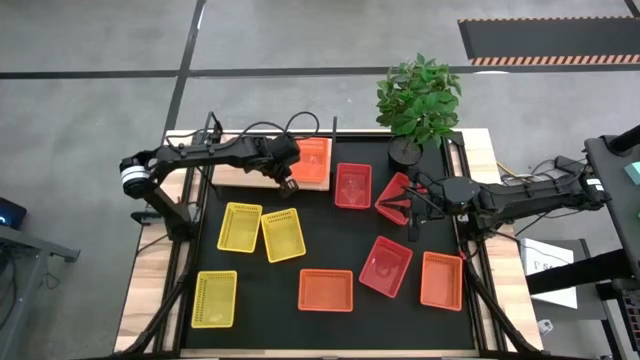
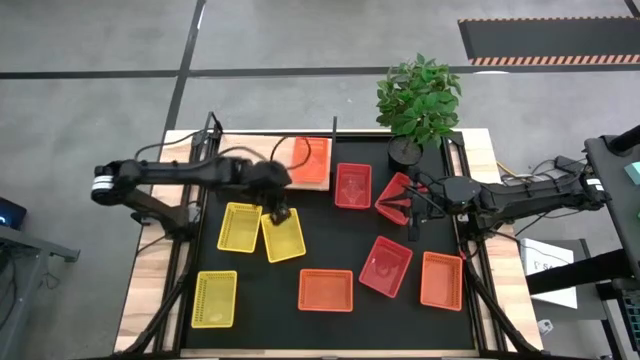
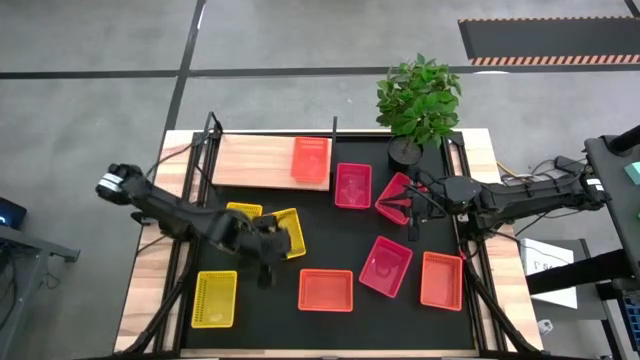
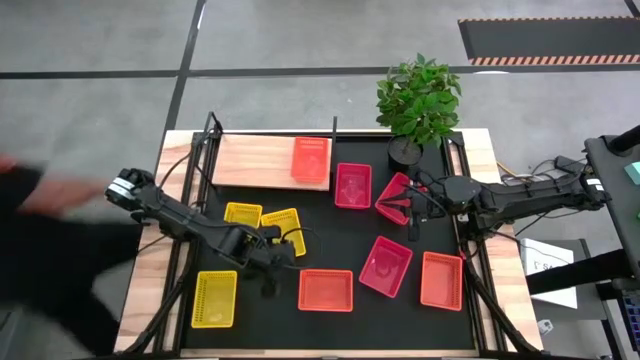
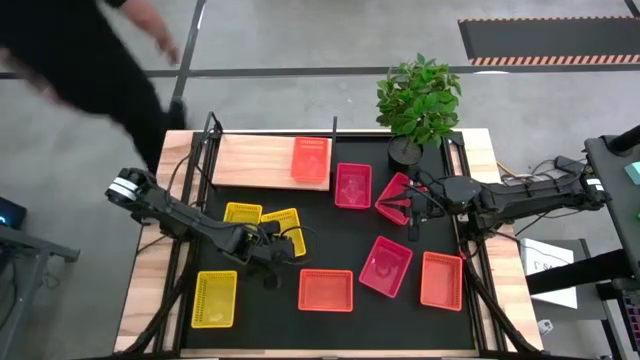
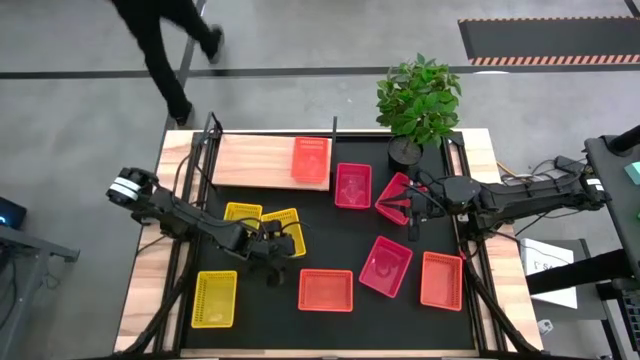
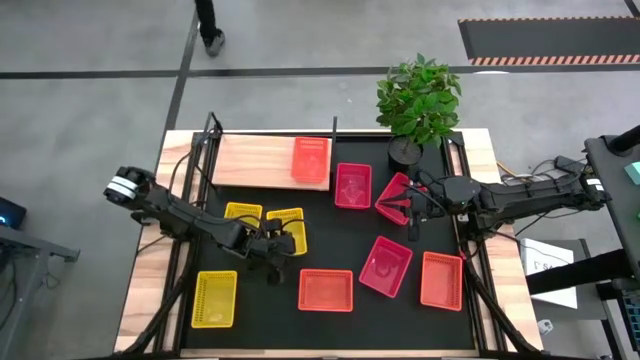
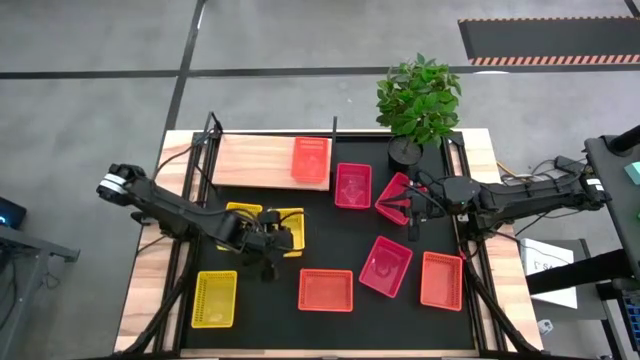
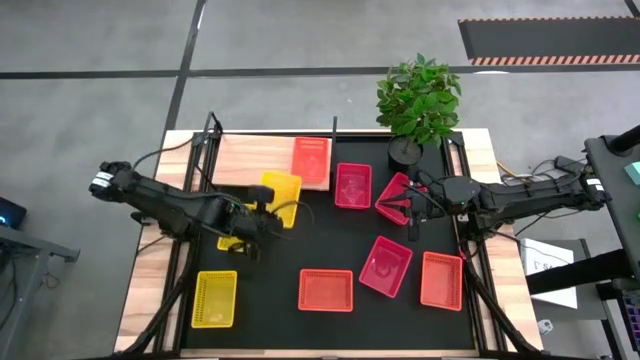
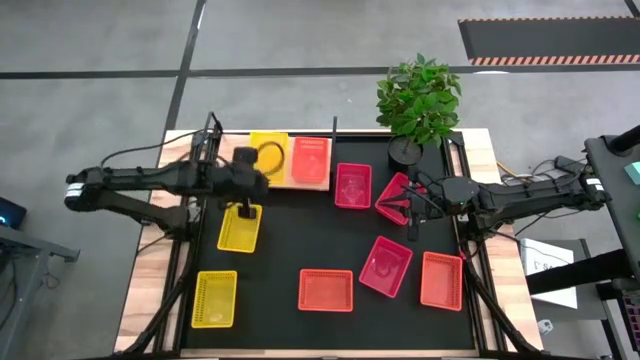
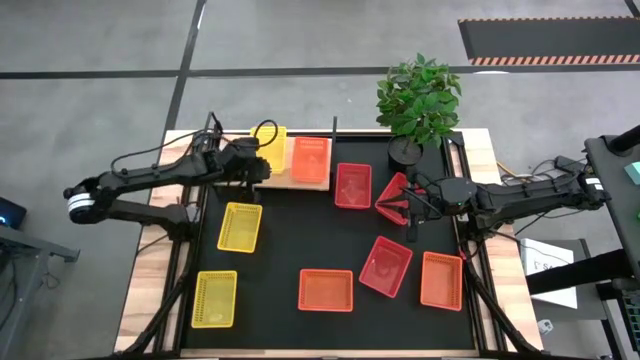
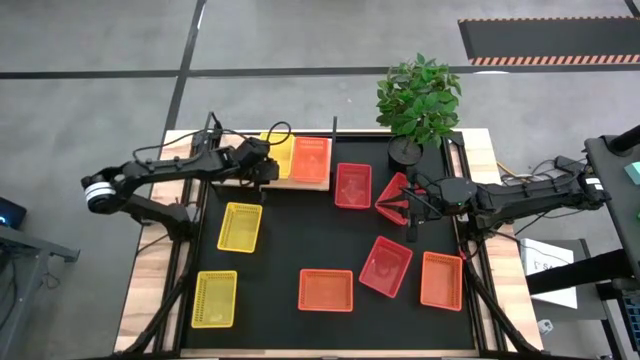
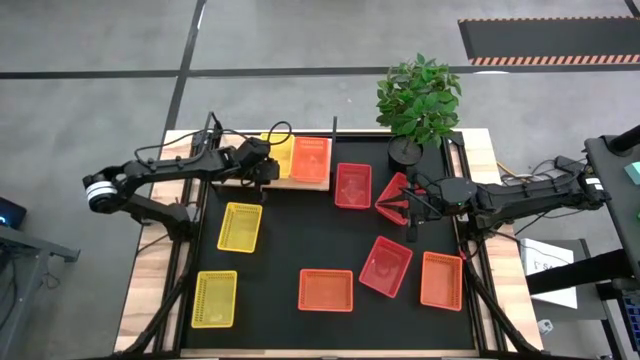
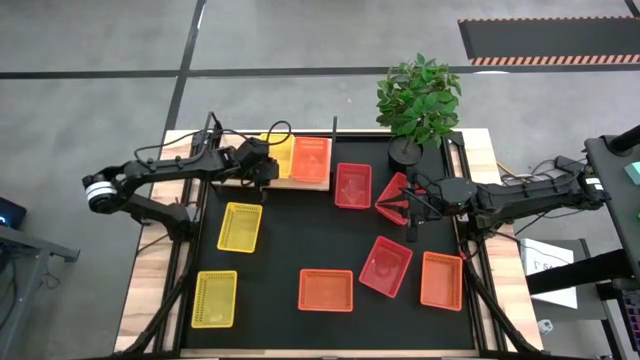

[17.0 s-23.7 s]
Task: Stack baskets on shelf by color
Put the top right yellow bin on the shelf

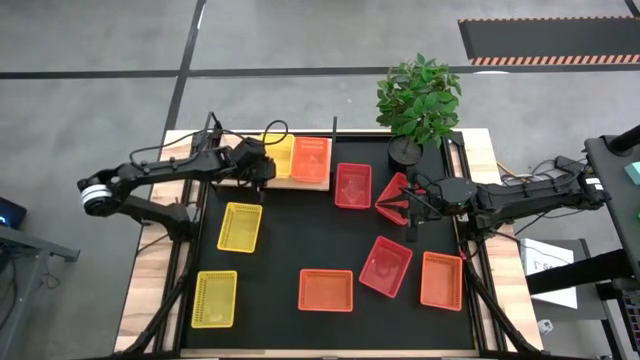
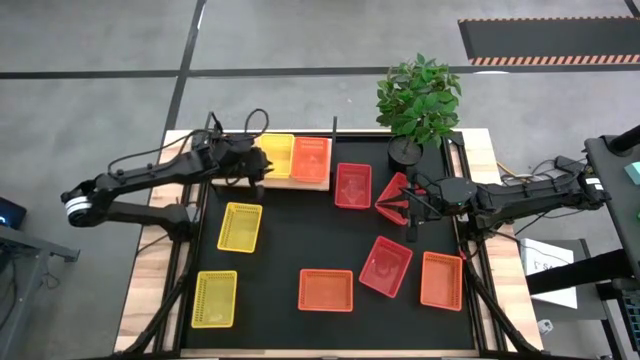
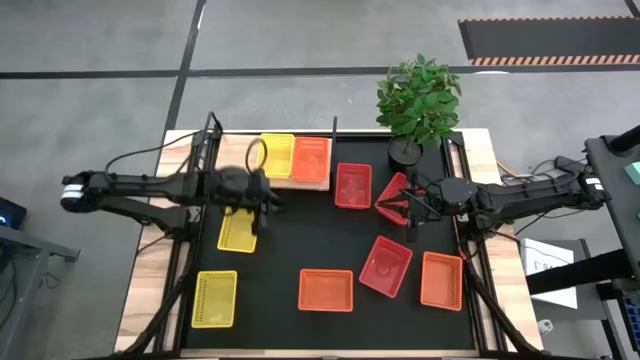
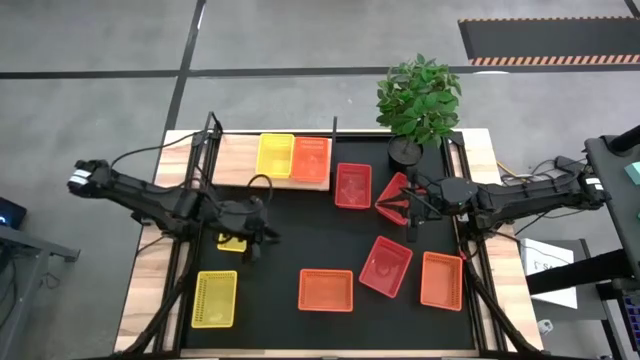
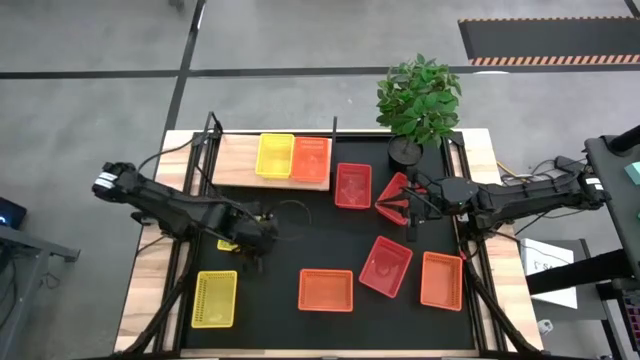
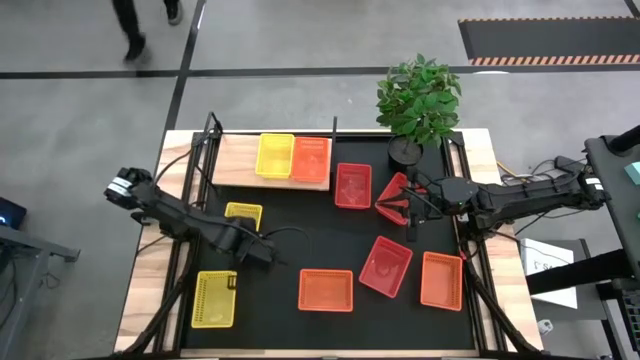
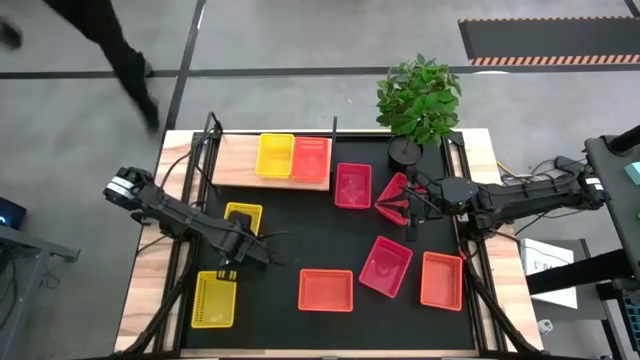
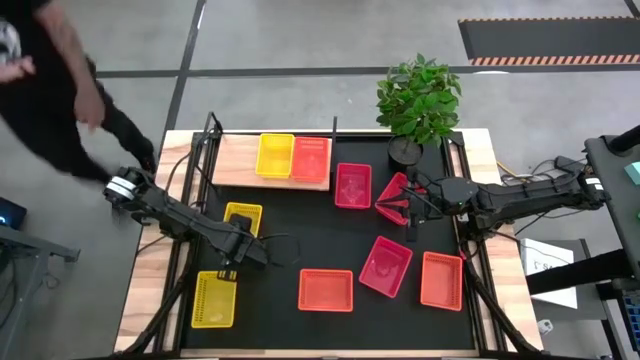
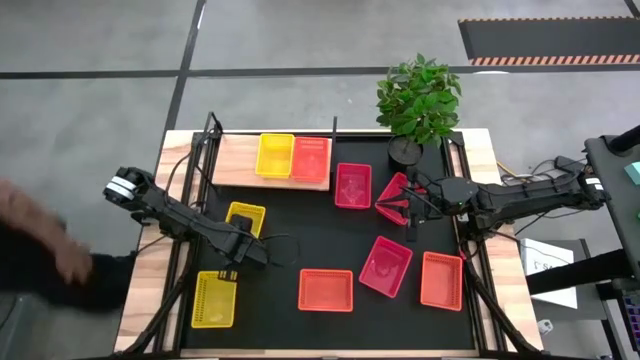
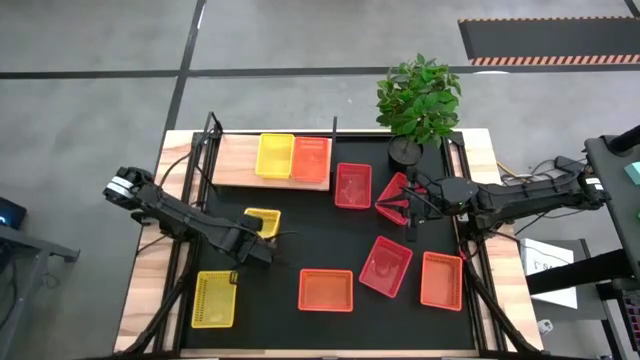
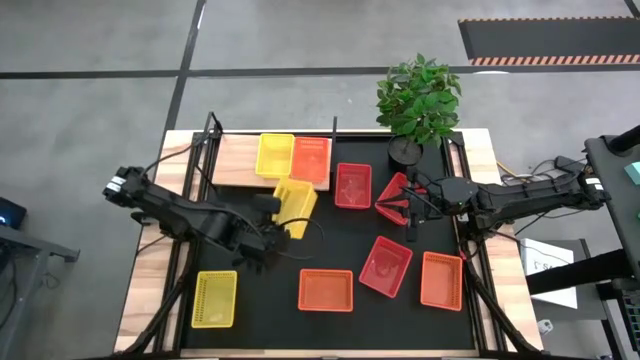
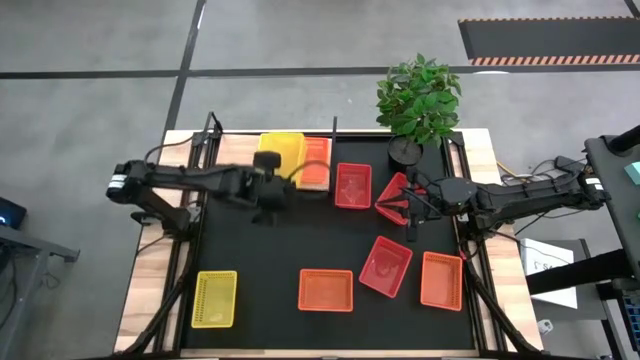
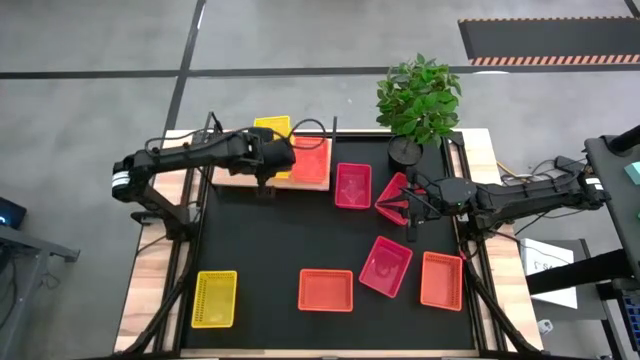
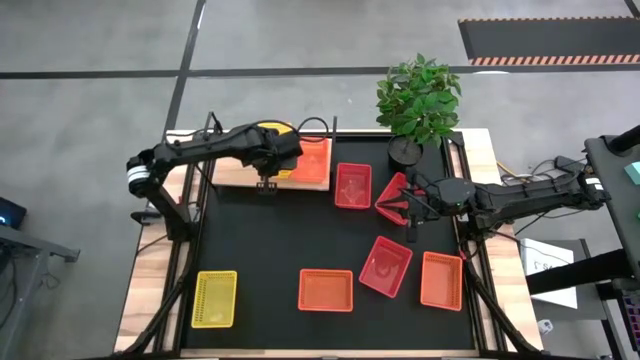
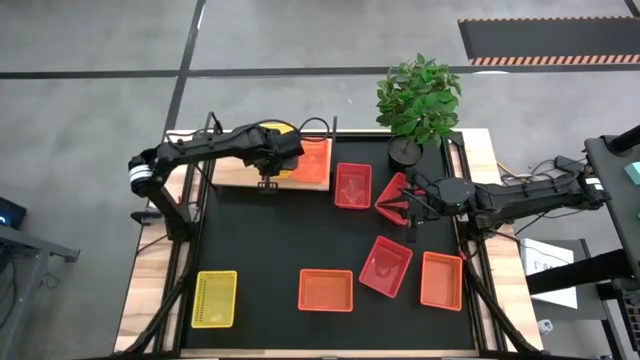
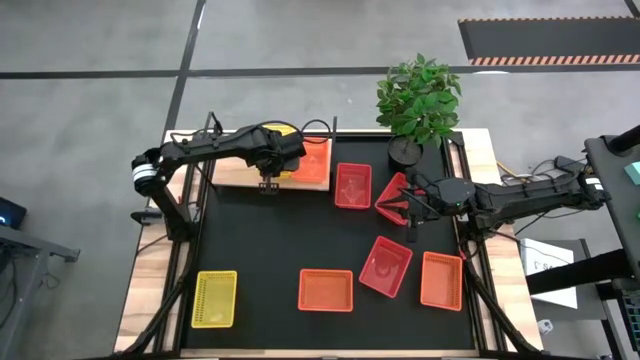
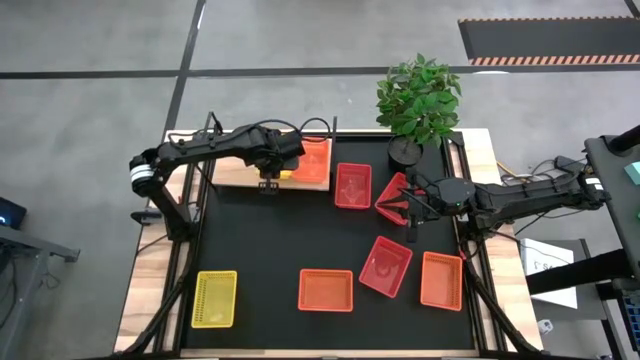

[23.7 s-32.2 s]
Stack the top yellow bin on top of the other yellow bin on the shelf

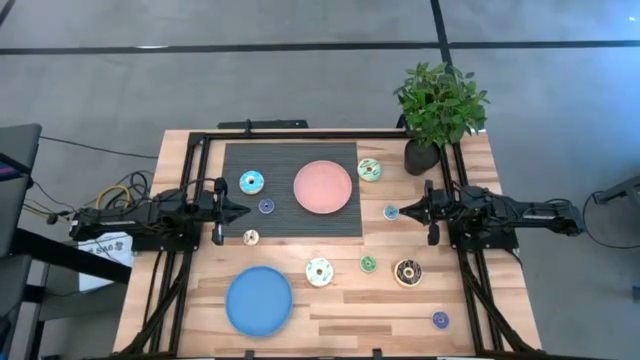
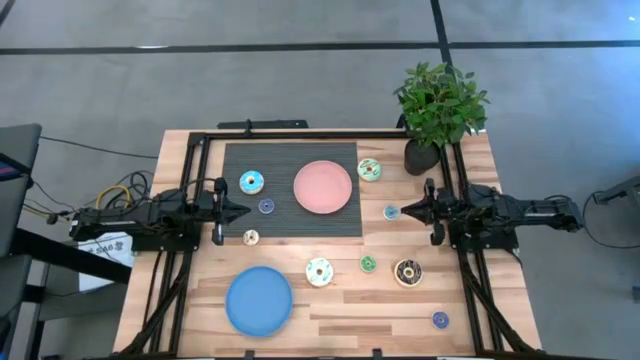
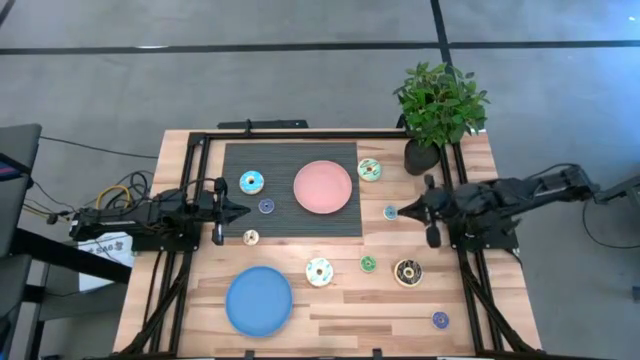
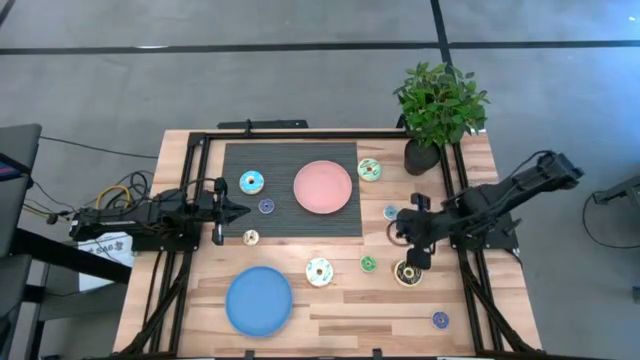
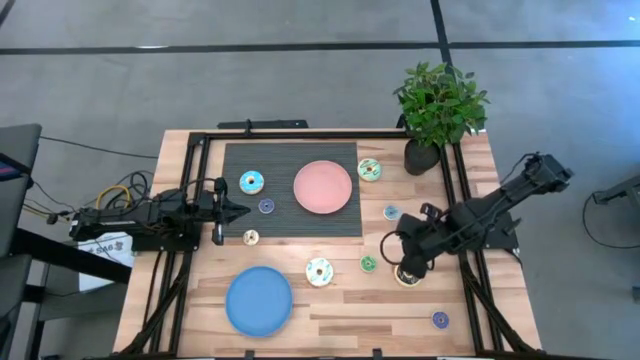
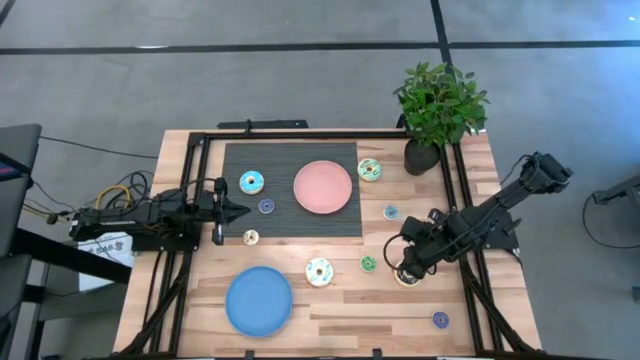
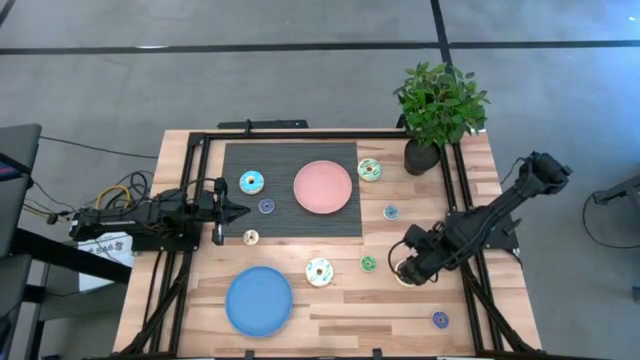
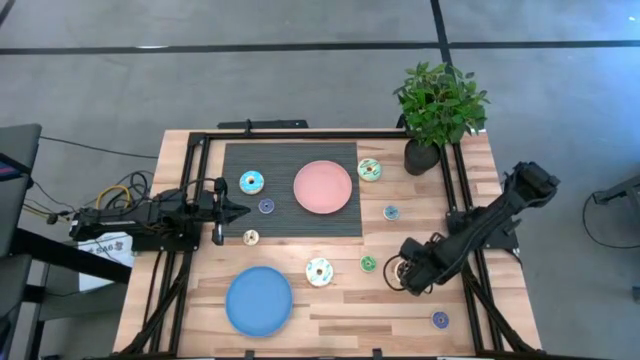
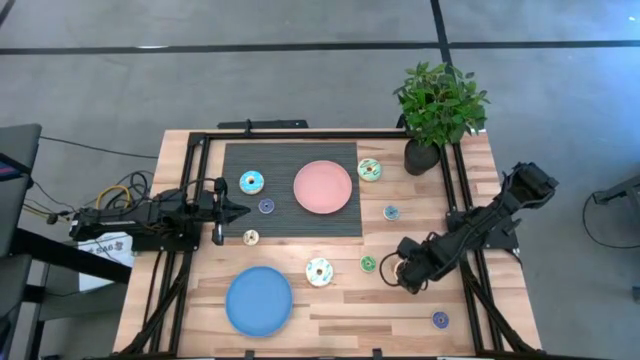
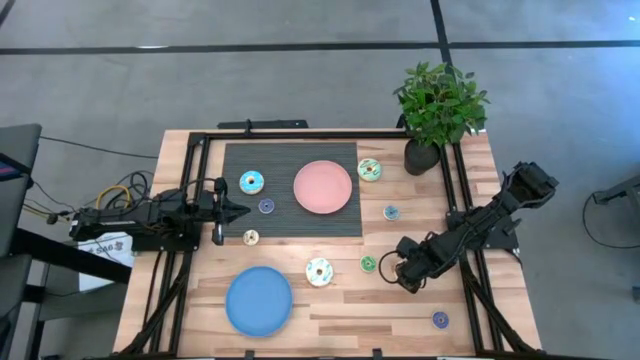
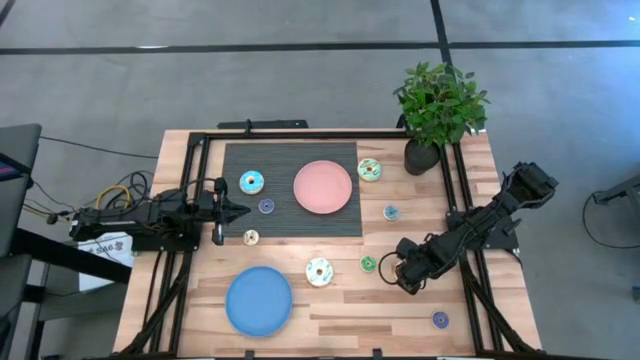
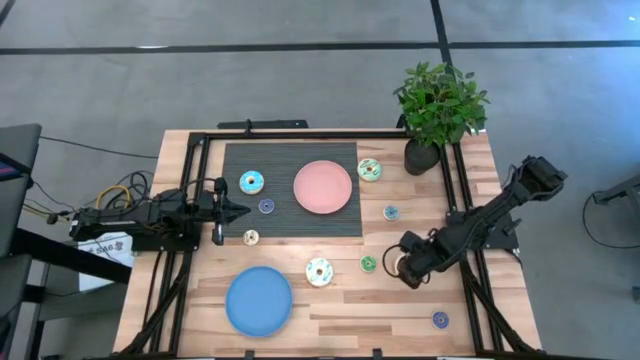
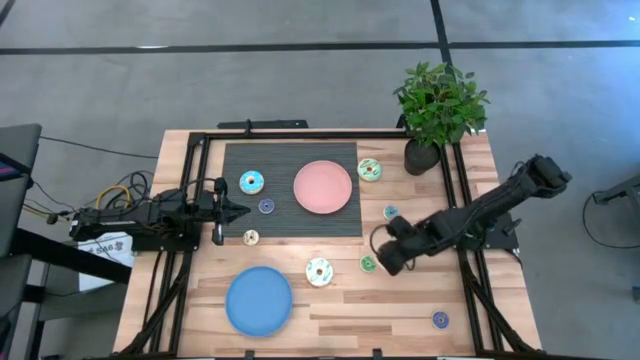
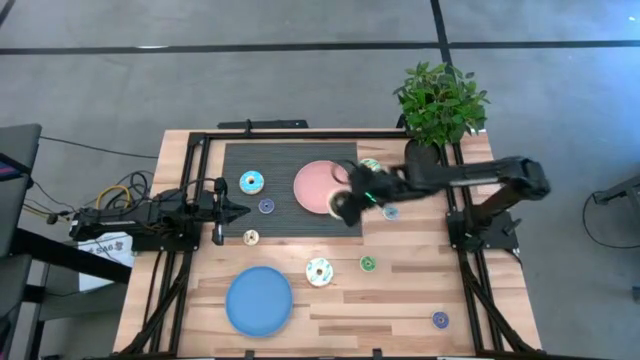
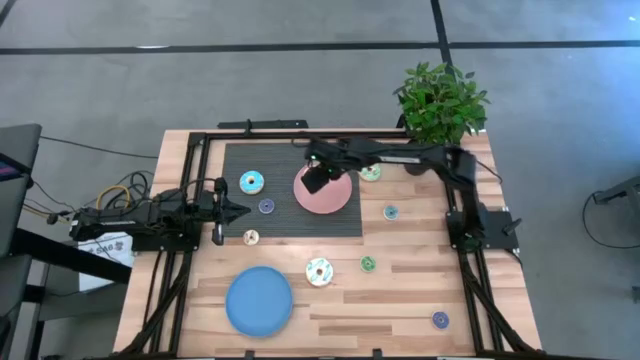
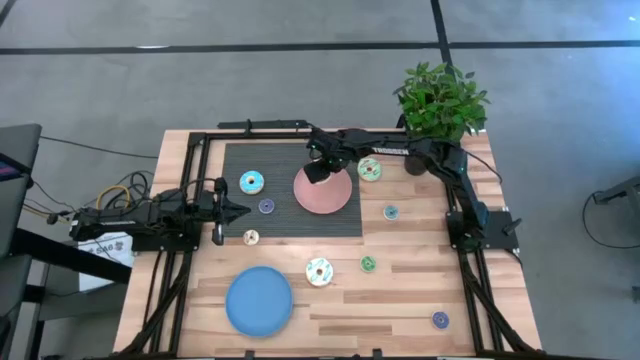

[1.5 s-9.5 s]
Task: Pick & Place donuts
Put the large black donut on the pink plate
